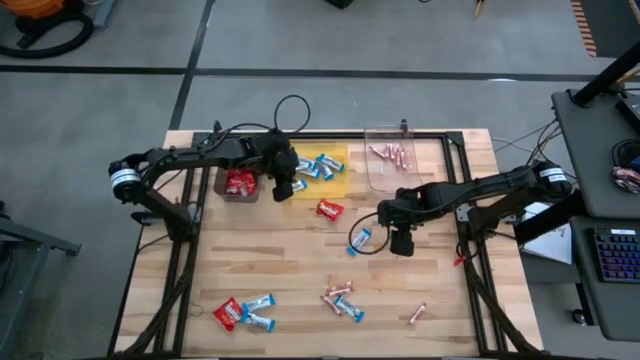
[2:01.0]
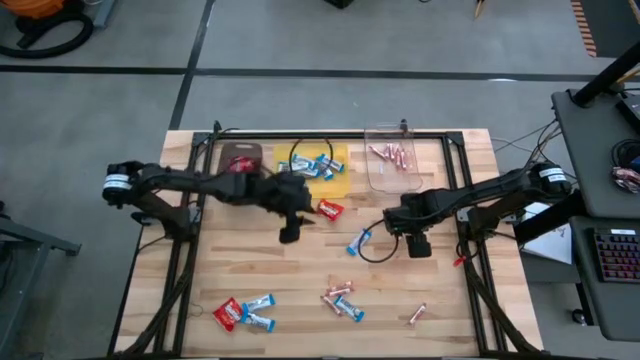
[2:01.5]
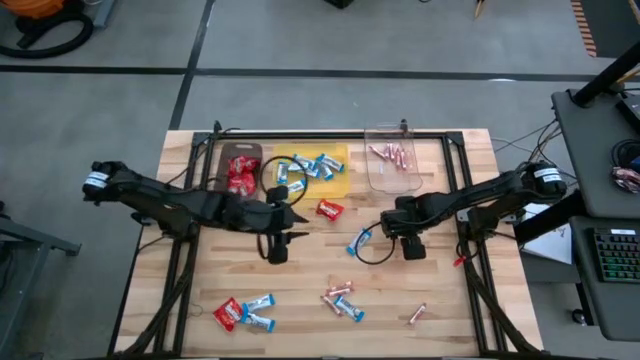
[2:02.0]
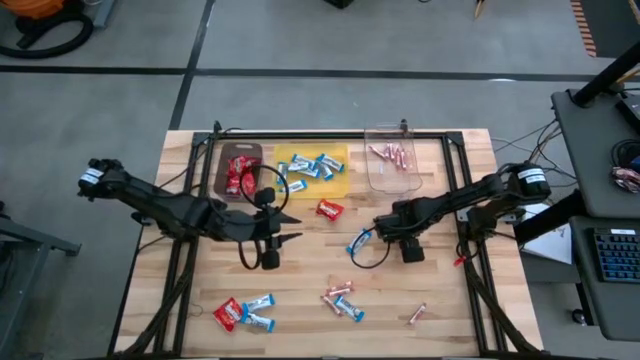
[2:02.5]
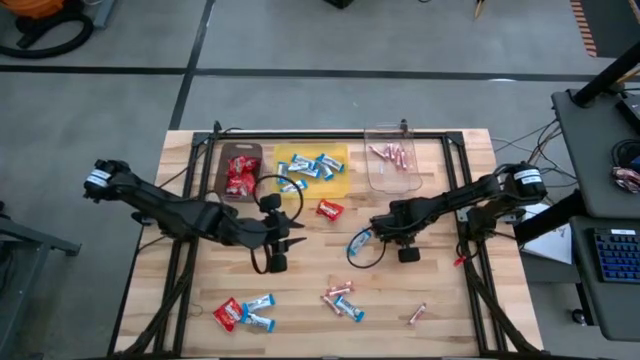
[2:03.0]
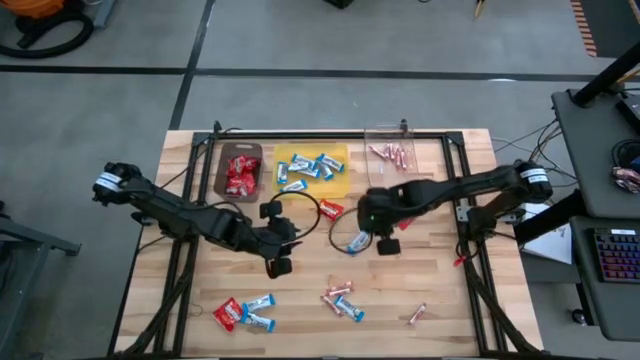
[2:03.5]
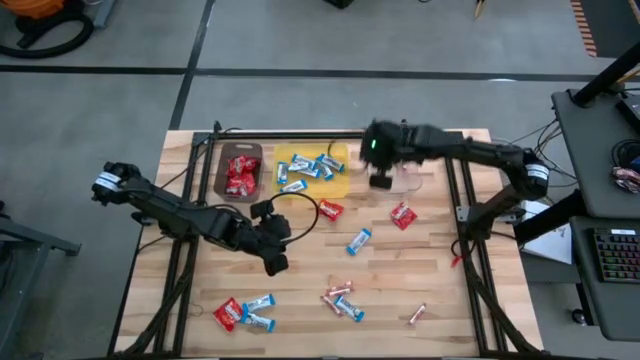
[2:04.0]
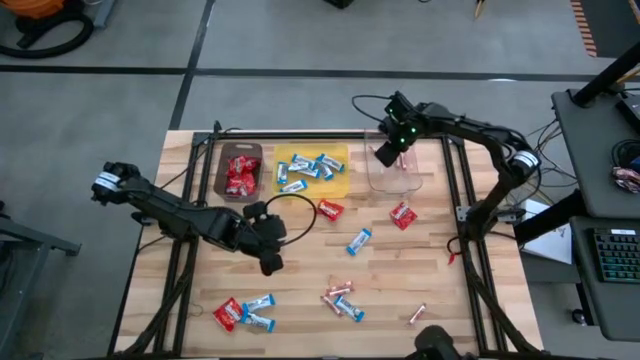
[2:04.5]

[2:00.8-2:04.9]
Task: Sort candy
Put the orange candy into the yellow bin

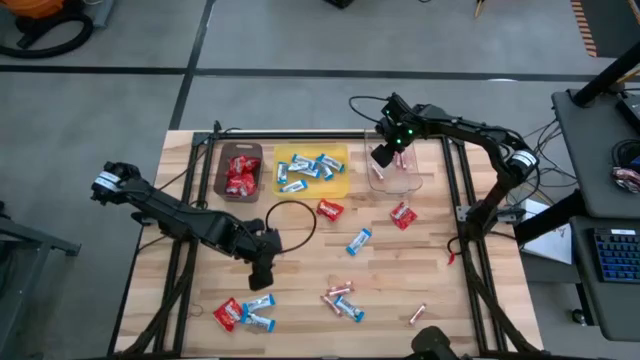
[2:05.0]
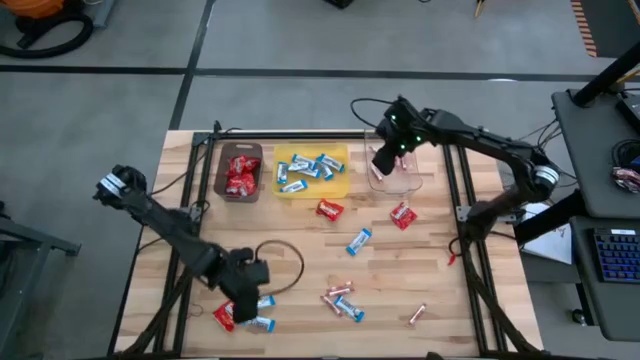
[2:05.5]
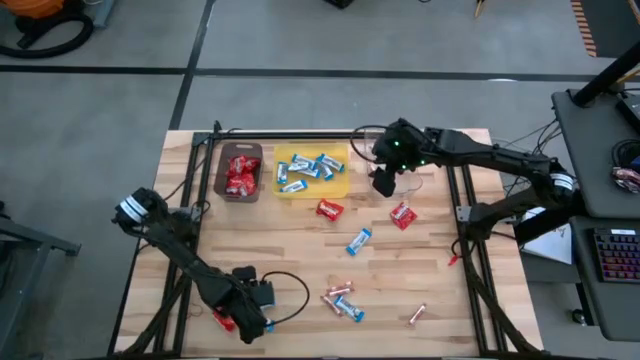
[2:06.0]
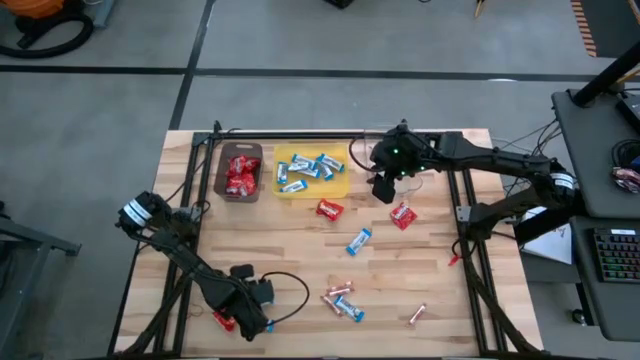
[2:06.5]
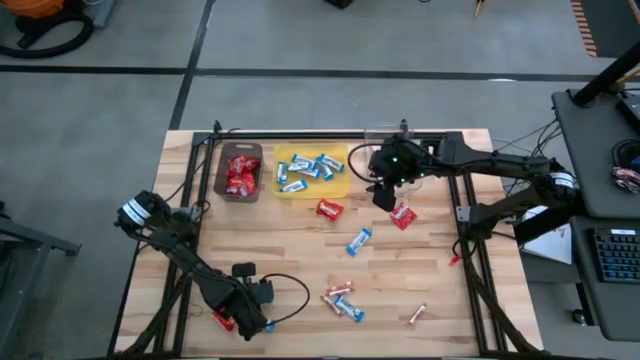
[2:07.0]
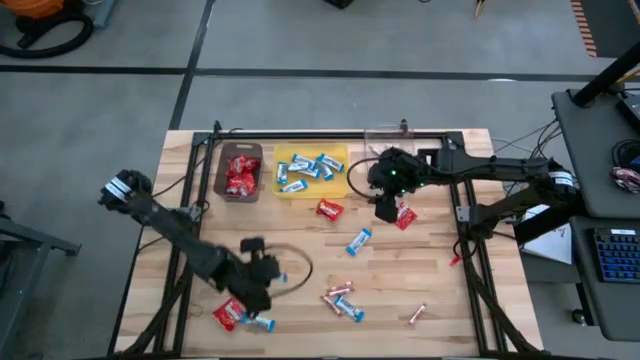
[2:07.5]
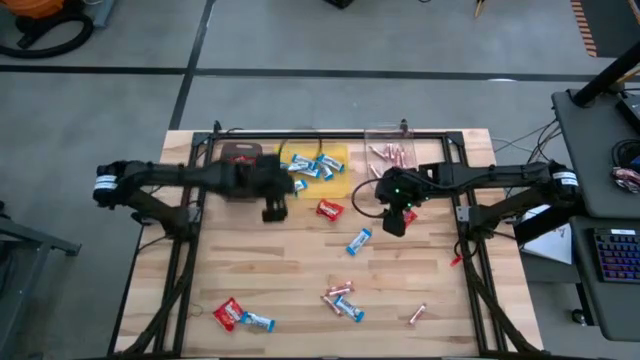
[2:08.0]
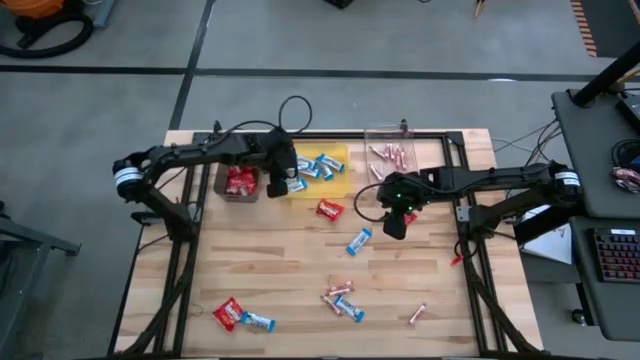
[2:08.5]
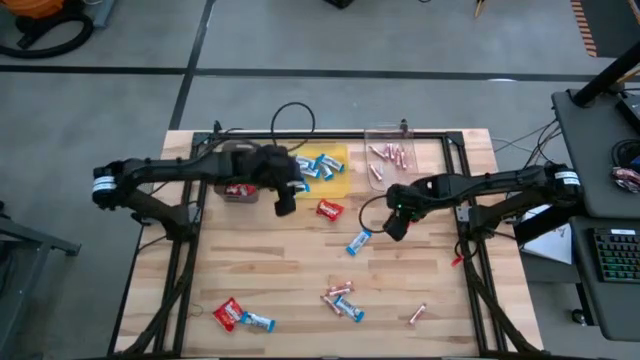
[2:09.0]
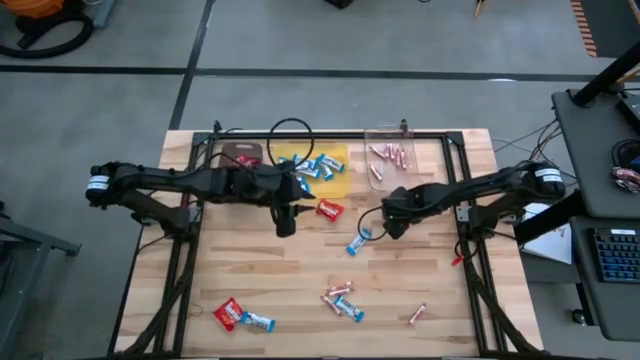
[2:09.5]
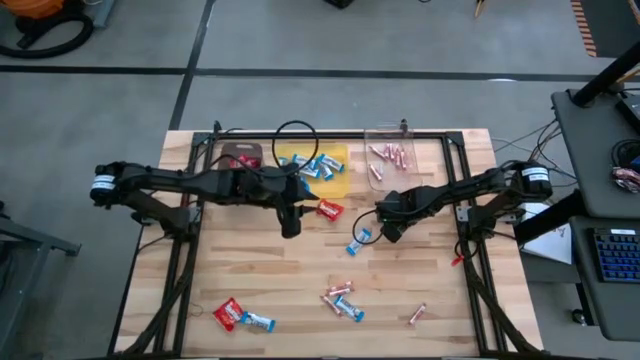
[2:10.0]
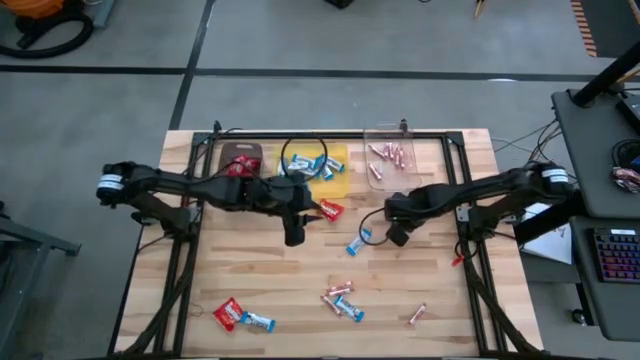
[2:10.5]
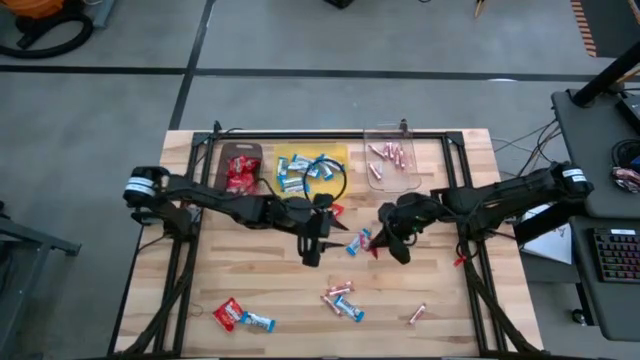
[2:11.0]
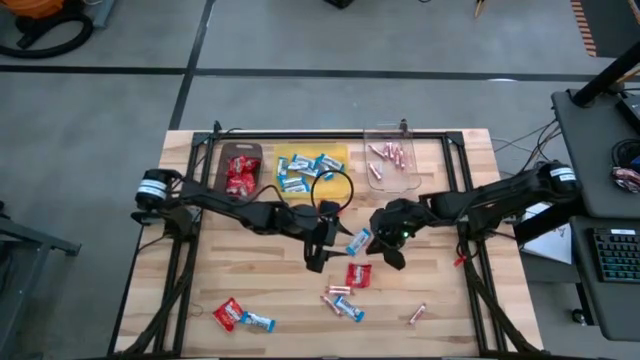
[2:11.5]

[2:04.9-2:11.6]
Put the white candy into the yellow bin

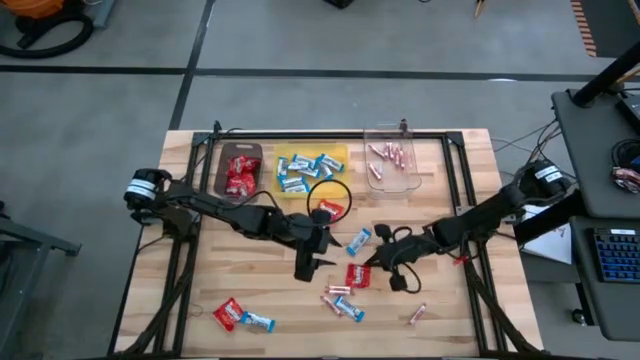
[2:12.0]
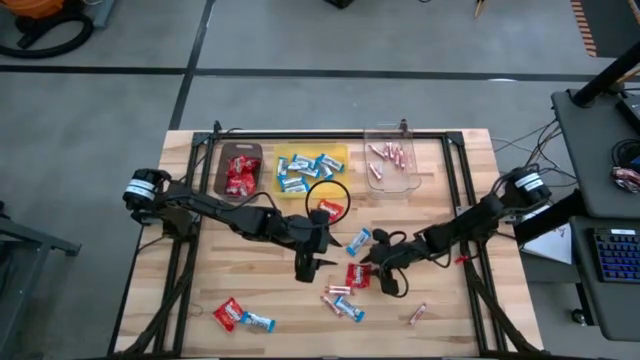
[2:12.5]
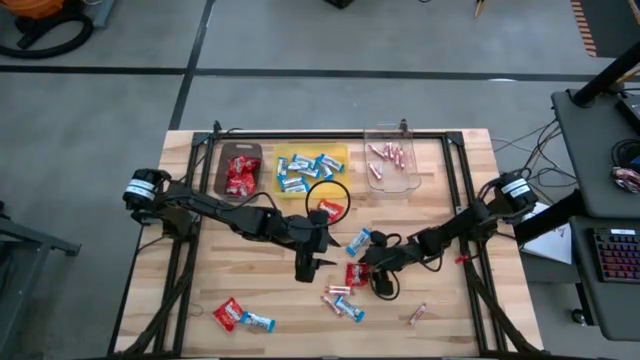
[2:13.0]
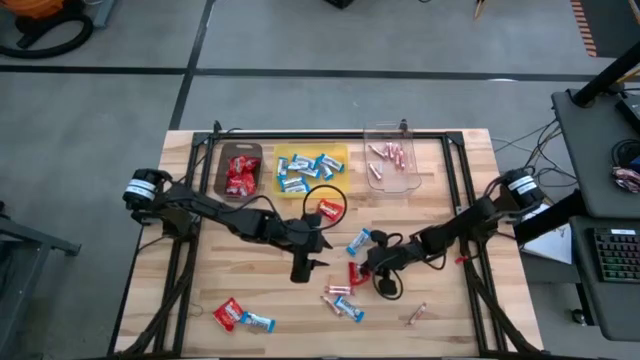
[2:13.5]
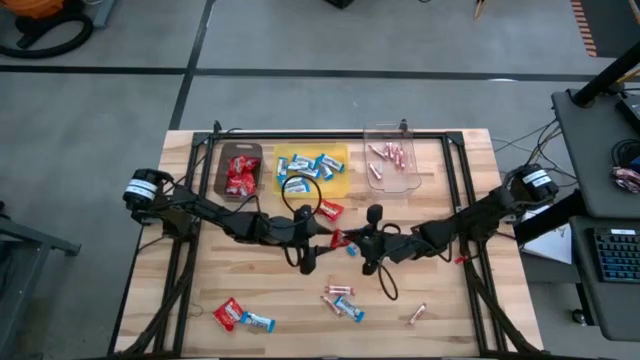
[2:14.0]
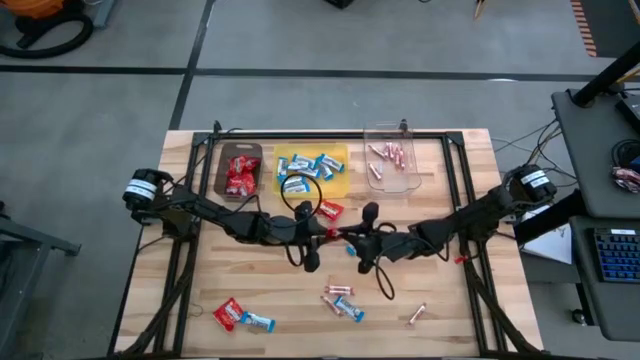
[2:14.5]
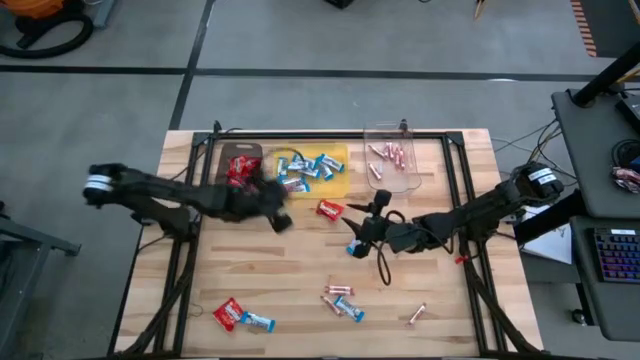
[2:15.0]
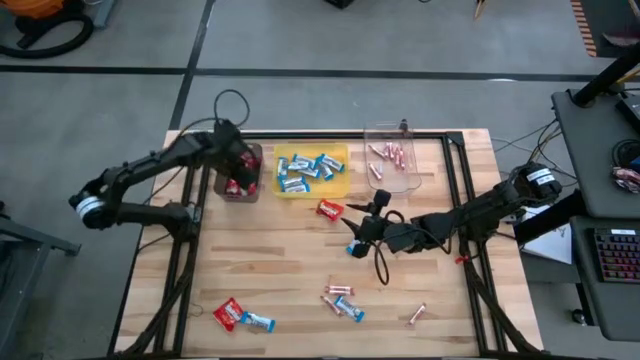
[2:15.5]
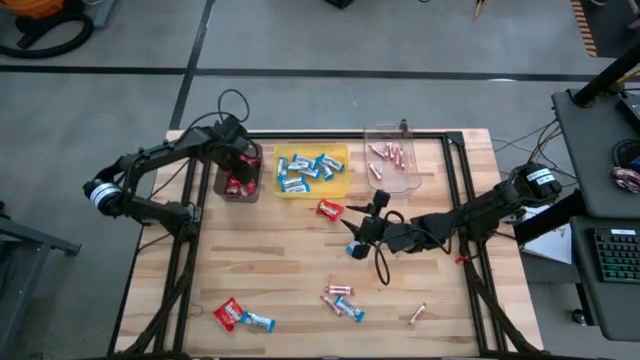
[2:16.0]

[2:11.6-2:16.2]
Put the red candy into the black bin

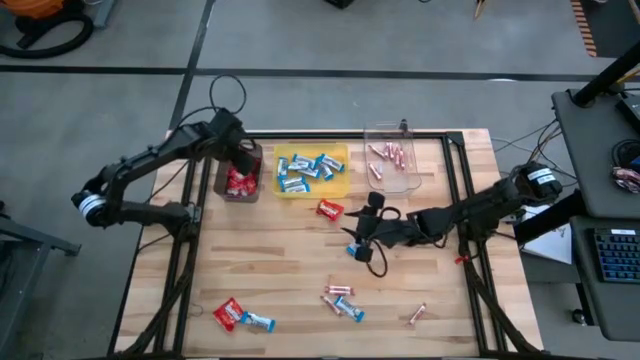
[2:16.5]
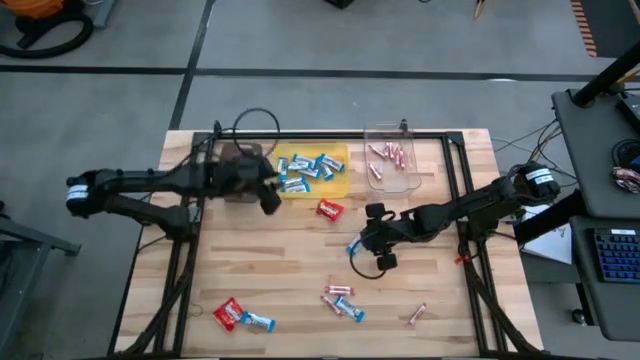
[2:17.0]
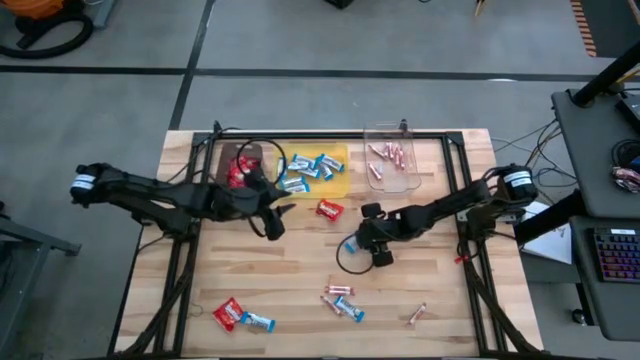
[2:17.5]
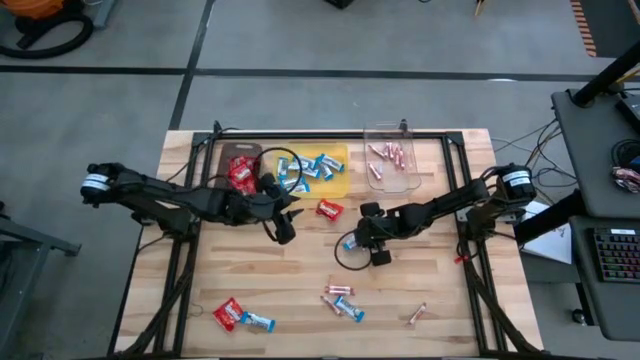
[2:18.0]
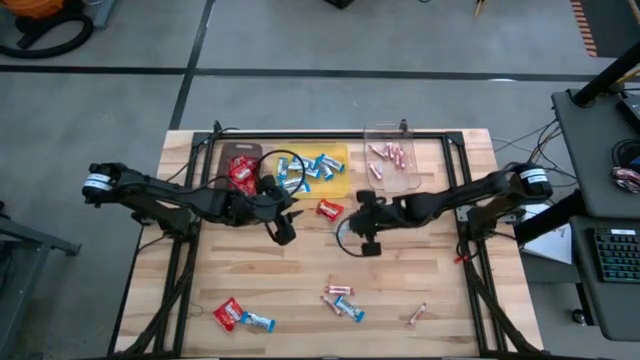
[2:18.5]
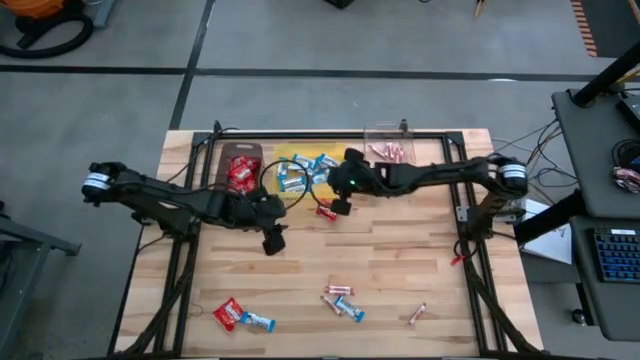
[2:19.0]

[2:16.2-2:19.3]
Put the white candy into the yellow bin

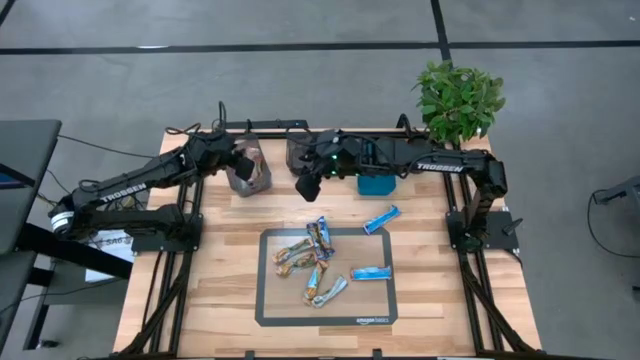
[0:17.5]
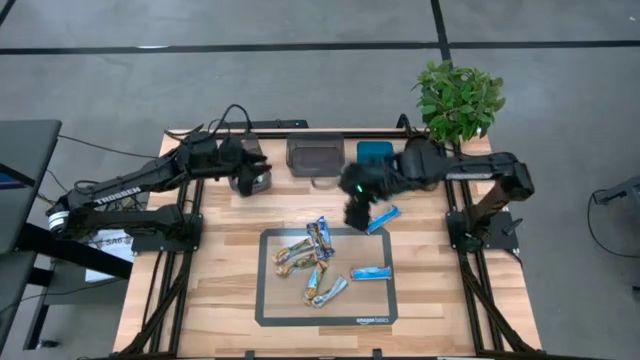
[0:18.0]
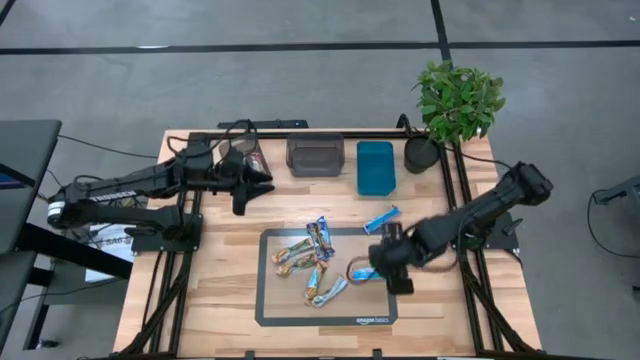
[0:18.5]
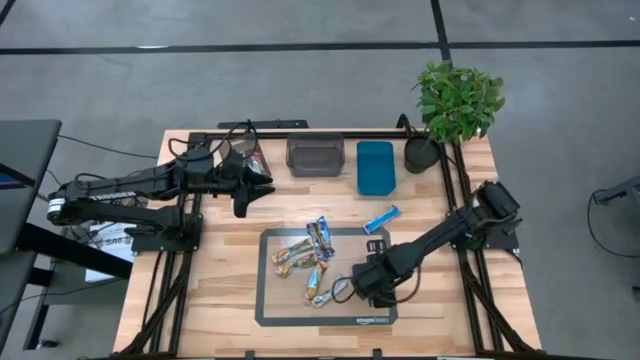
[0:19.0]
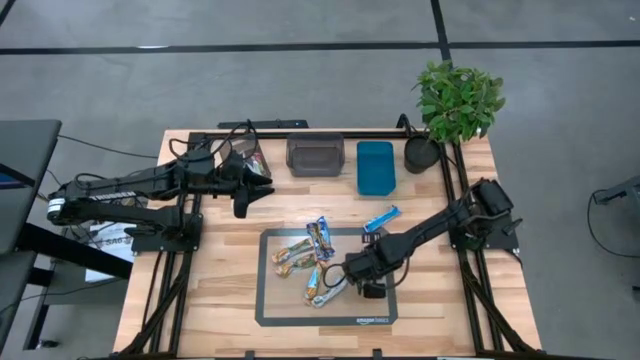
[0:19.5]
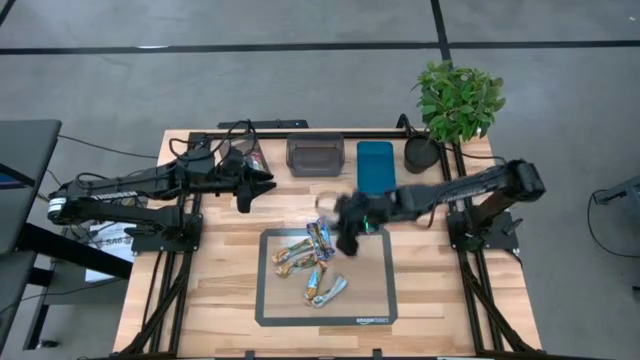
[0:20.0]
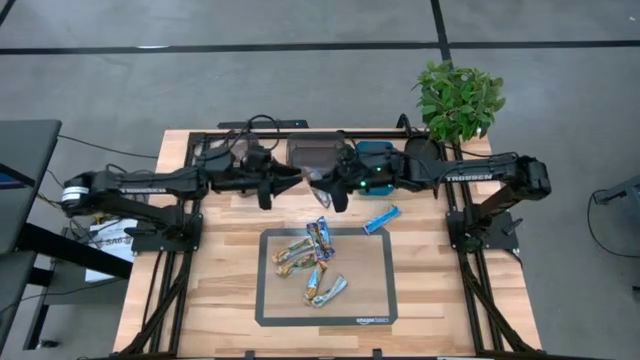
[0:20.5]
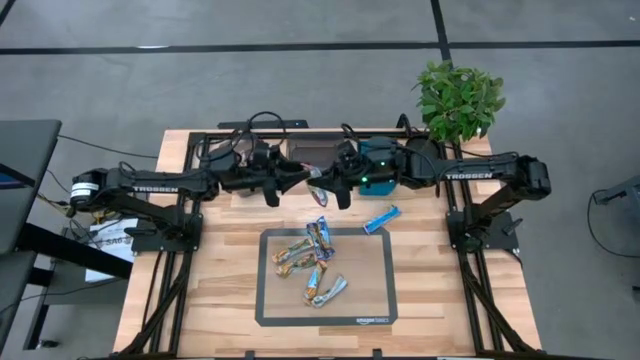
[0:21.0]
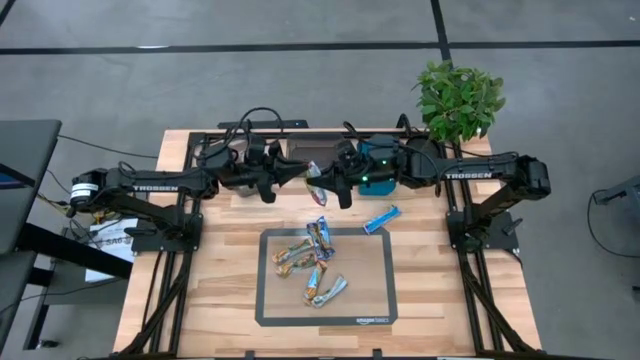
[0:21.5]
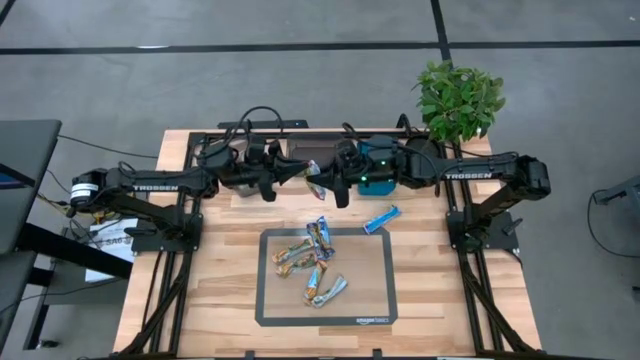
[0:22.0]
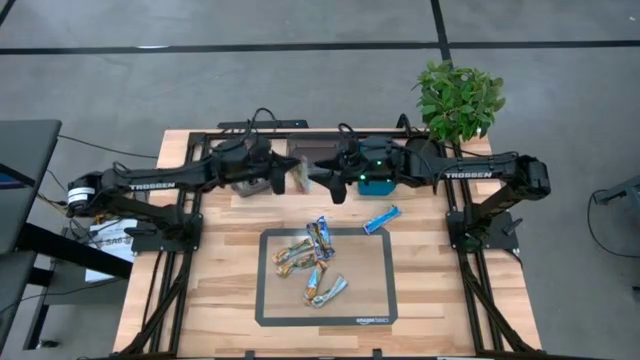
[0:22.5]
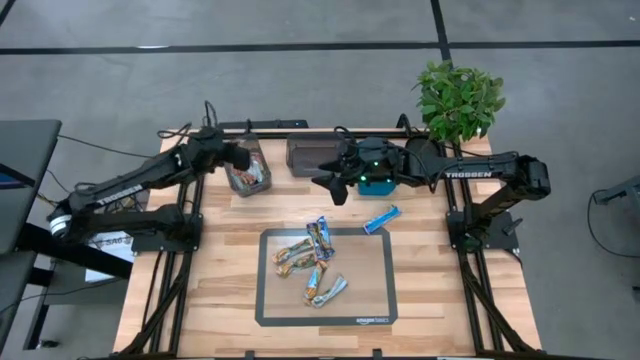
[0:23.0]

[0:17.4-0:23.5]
Task: Pick and place Granola Bars by type
Put the red granola bar into the left black bin
